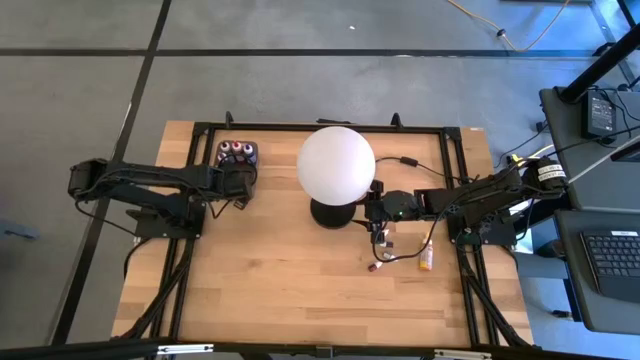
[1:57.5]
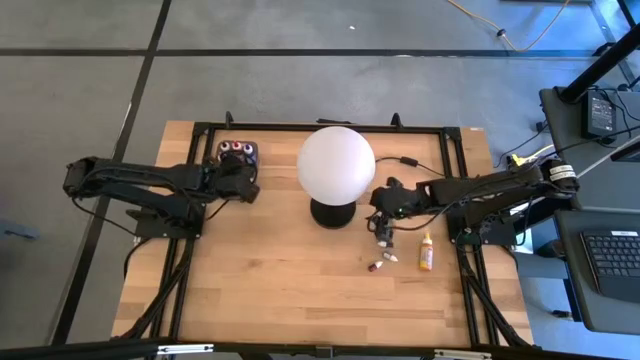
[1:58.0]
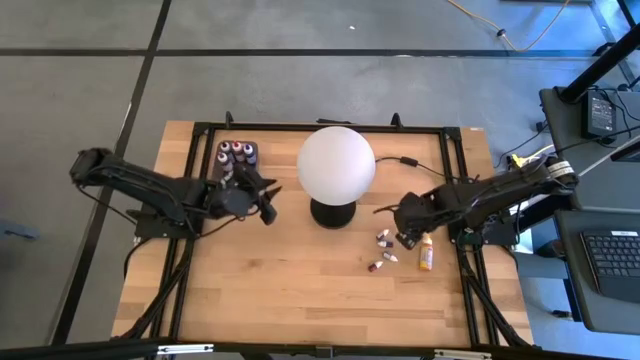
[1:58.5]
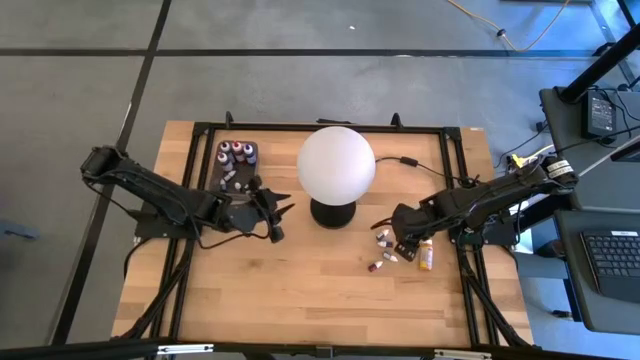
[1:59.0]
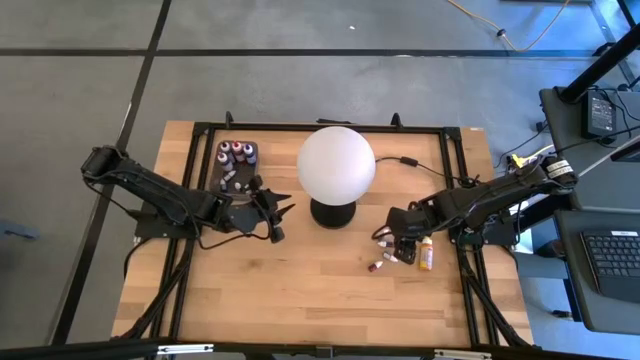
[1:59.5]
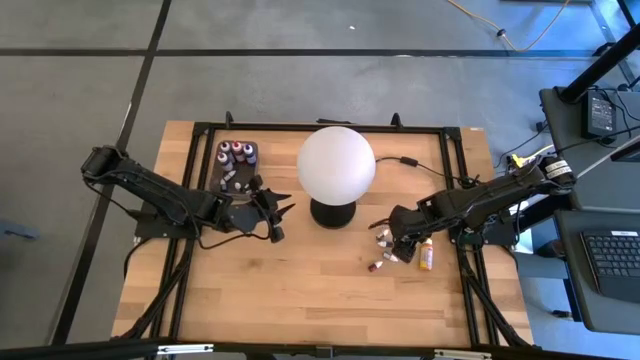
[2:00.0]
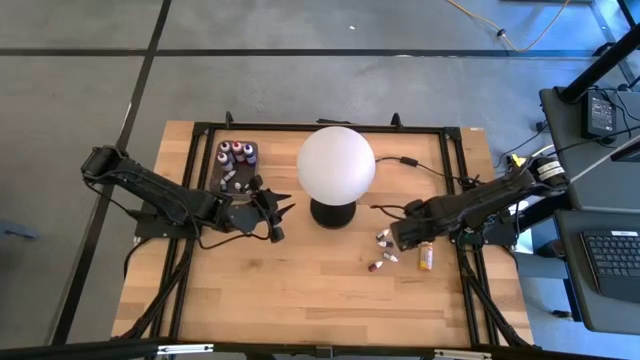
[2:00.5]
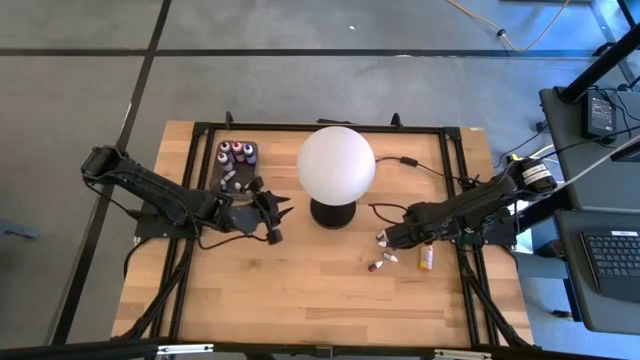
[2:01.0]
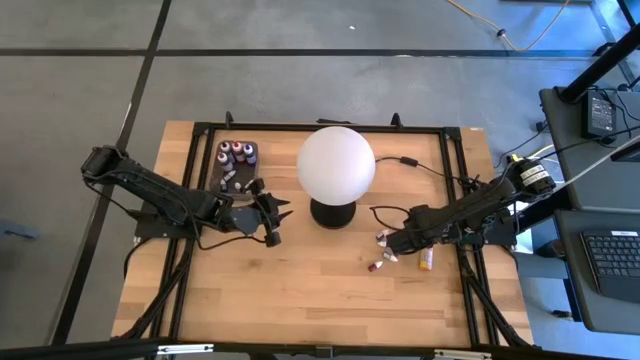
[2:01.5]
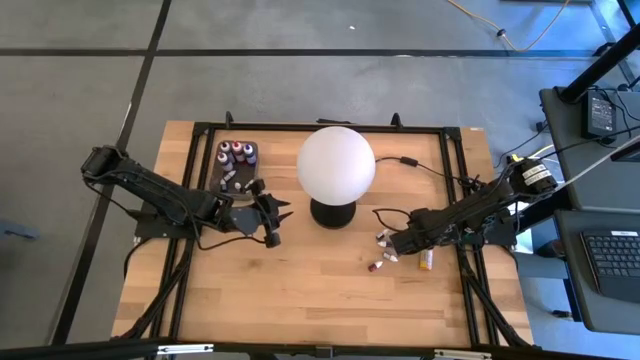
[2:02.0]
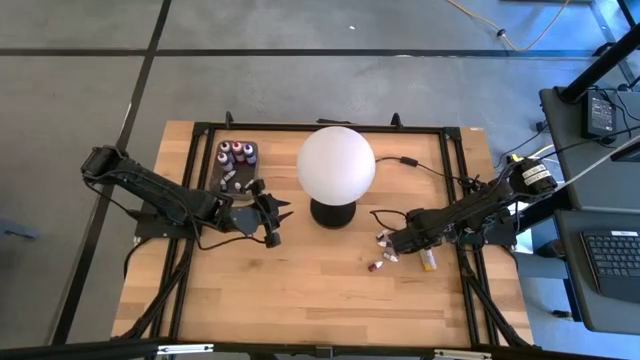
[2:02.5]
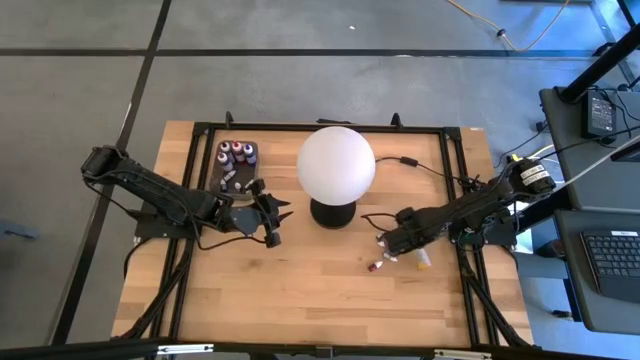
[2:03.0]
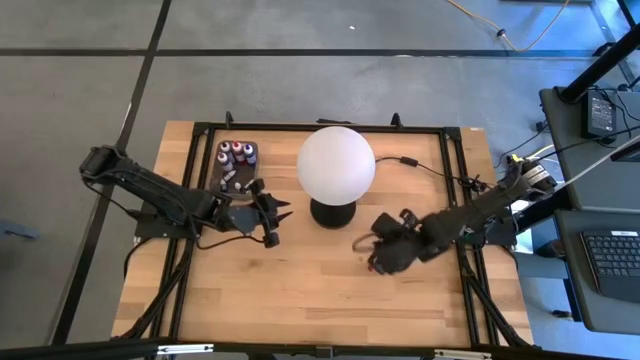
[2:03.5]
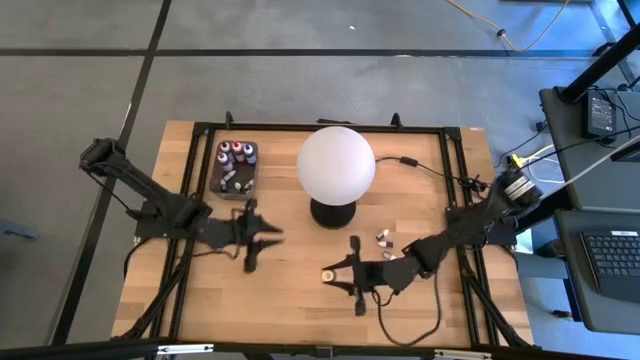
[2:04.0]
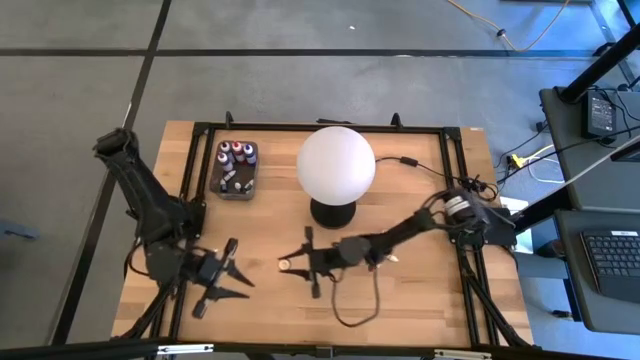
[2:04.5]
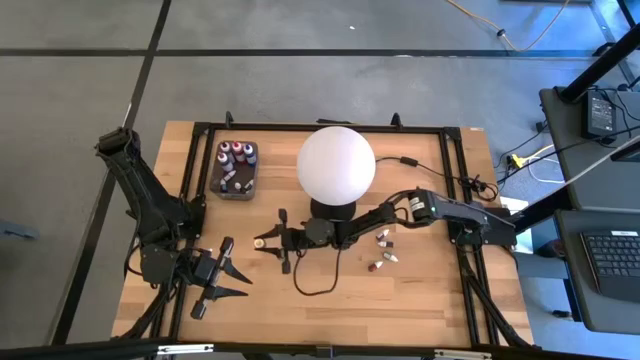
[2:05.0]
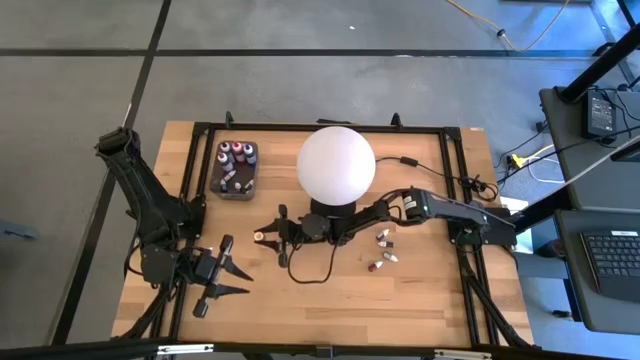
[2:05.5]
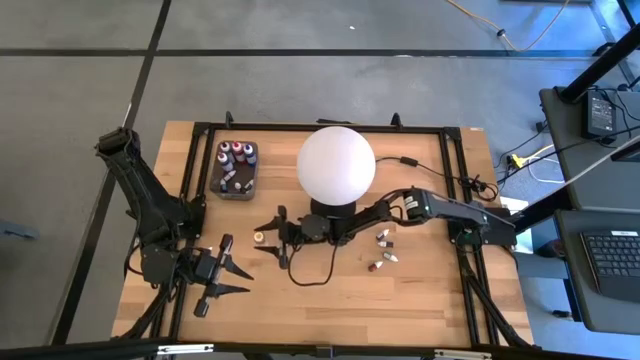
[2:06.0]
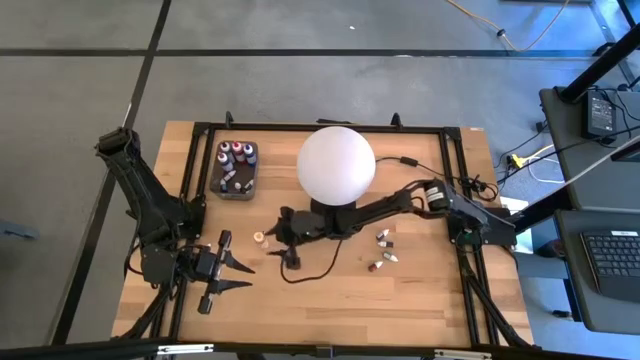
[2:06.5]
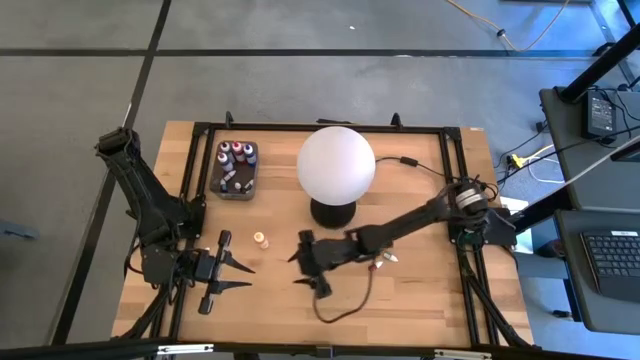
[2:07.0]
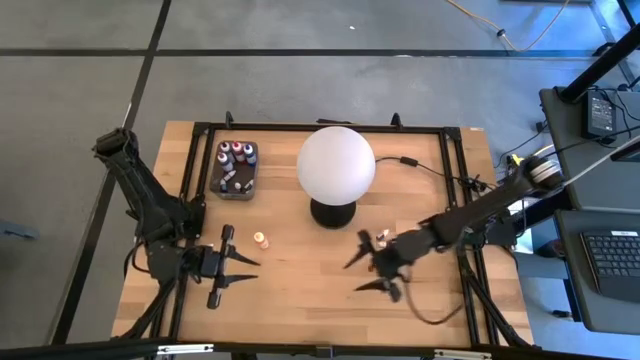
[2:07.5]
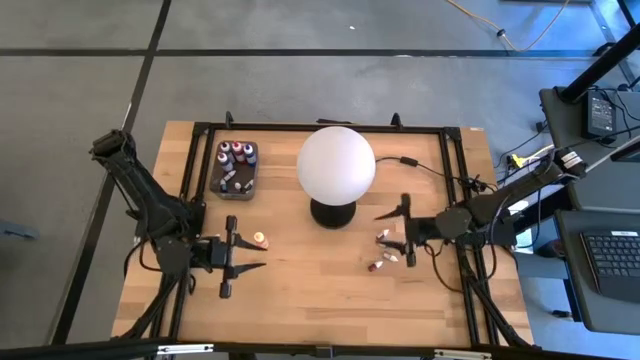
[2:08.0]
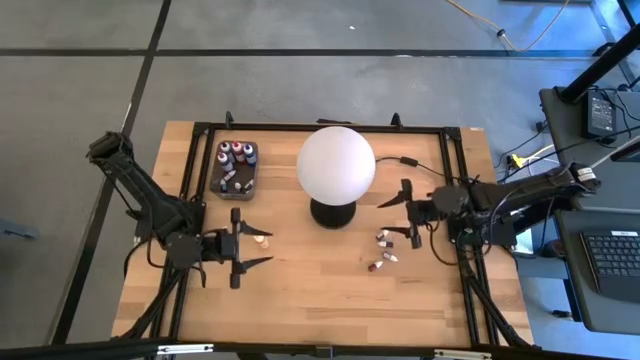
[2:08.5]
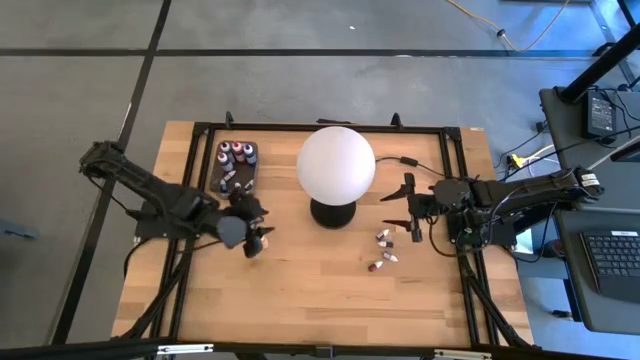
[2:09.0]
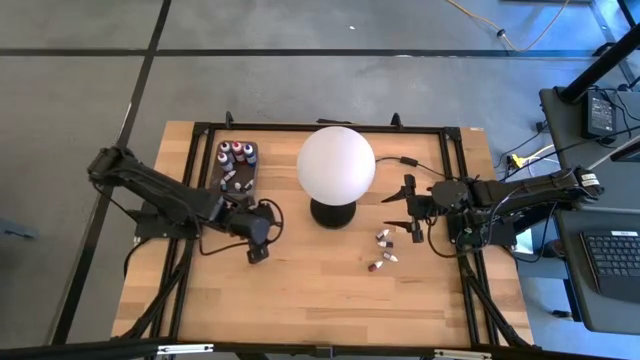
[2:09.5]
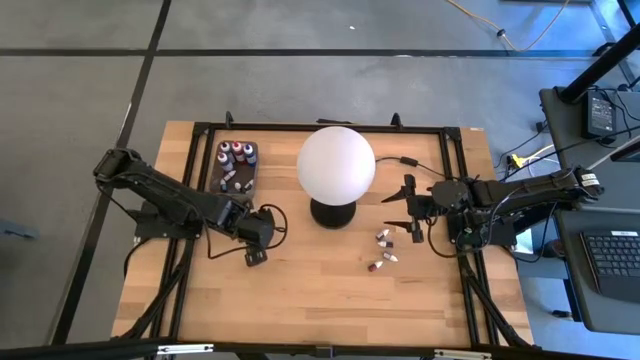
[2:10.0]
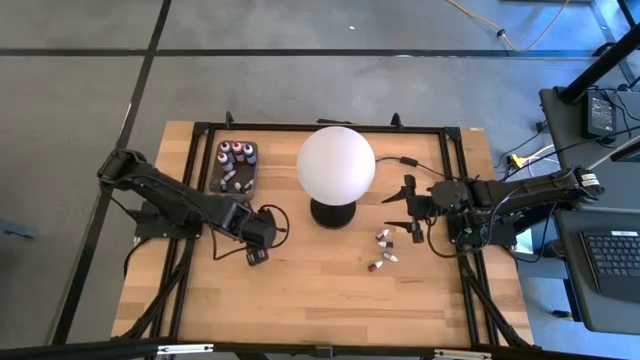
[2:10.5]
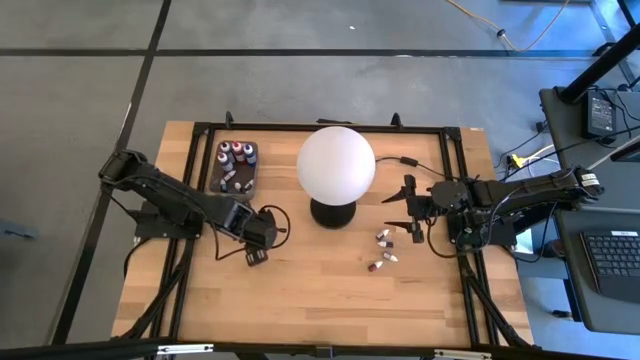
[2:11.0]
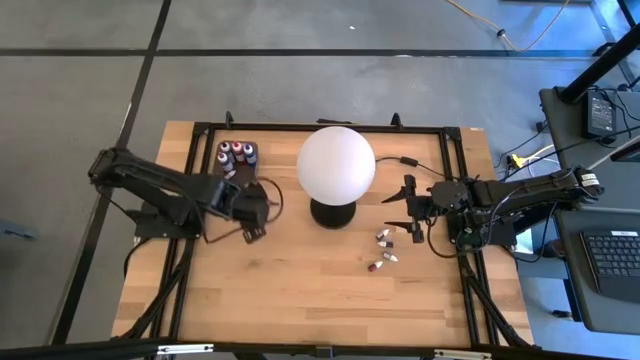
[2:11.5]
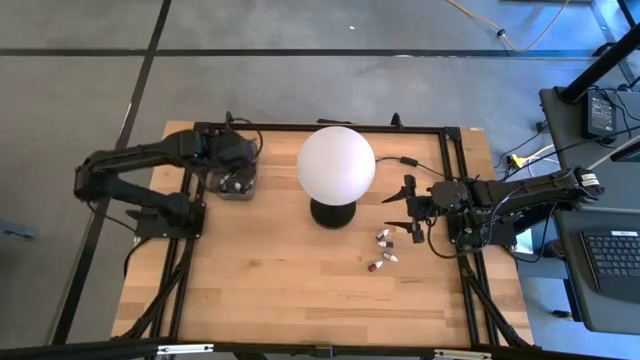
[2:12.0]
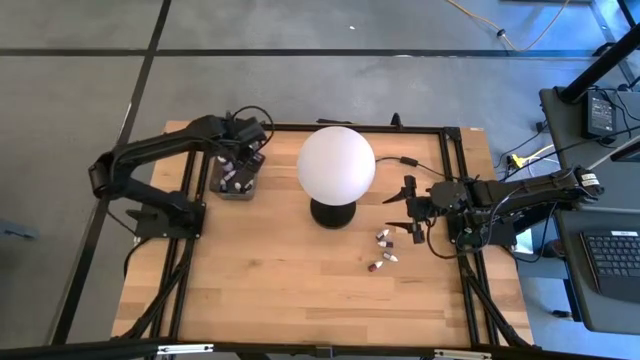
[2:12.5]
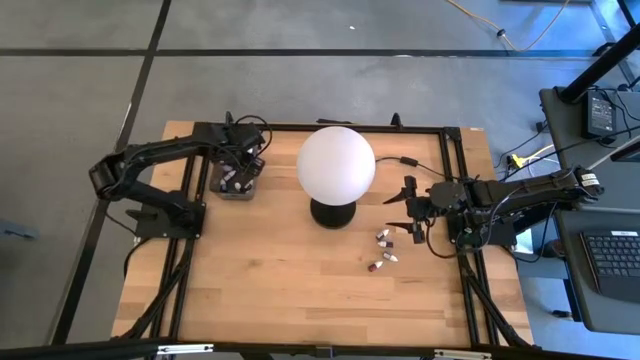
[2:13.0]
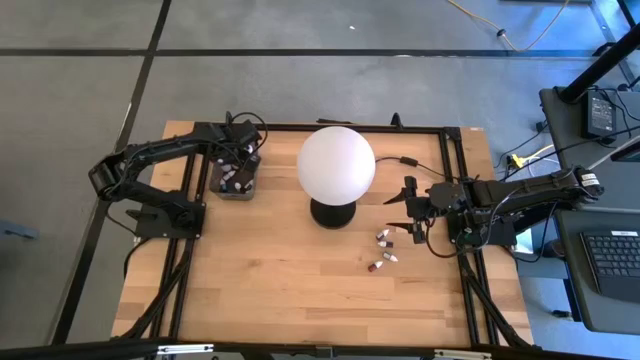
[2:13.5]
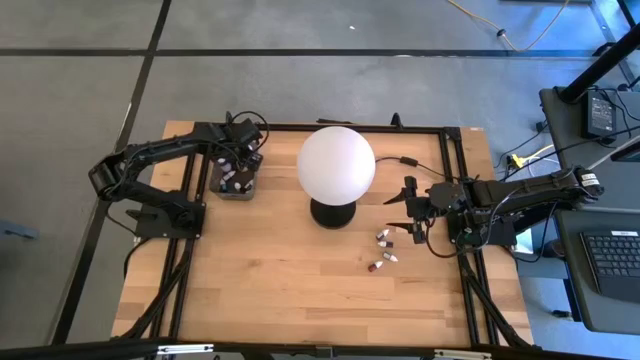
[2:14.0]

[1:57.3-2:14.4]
Task: Pick & Place food coloring
Put the big yellow food coloring bottle into the black container

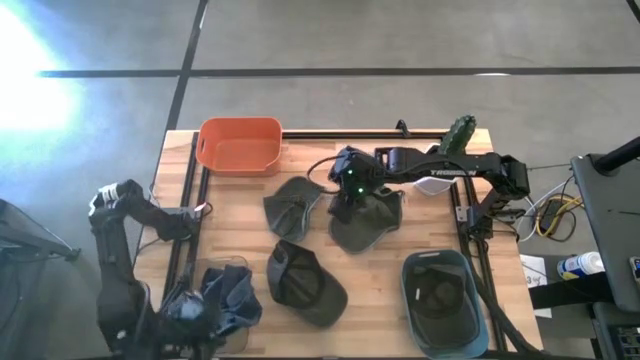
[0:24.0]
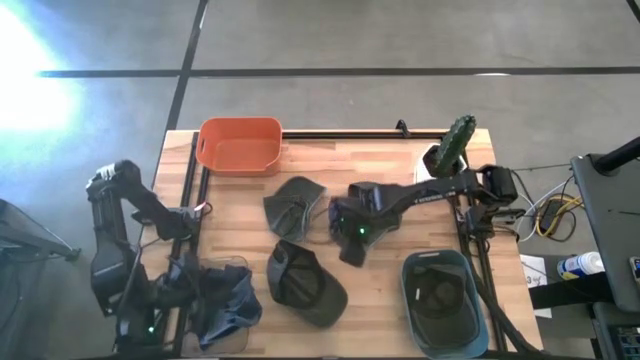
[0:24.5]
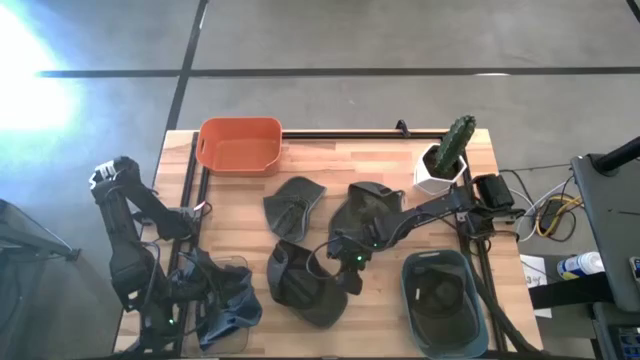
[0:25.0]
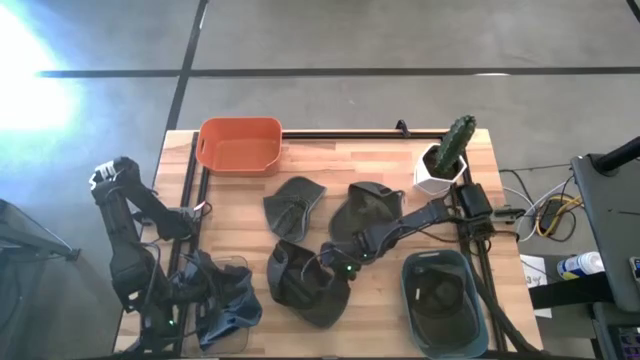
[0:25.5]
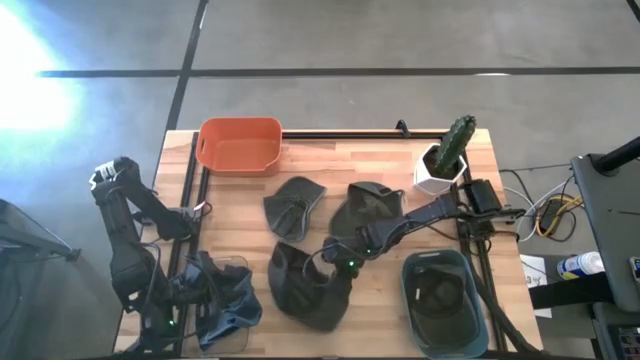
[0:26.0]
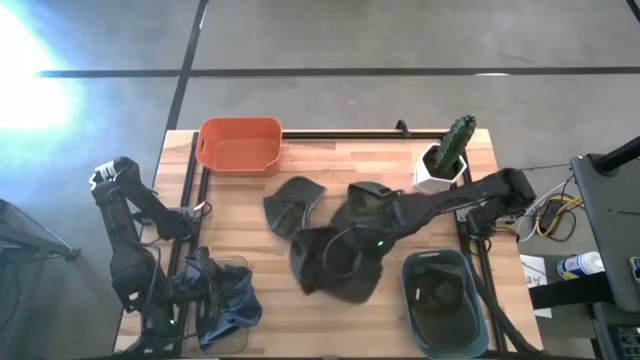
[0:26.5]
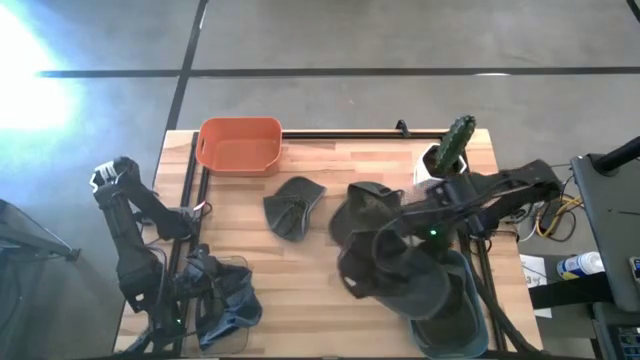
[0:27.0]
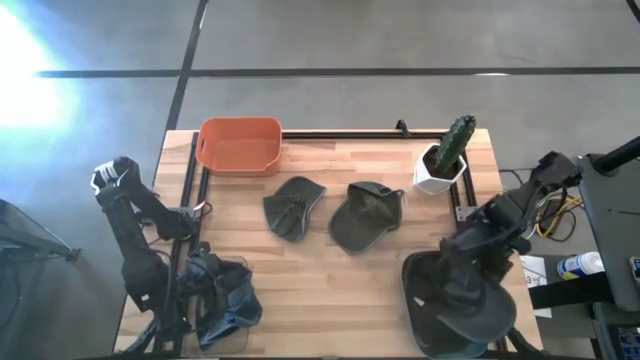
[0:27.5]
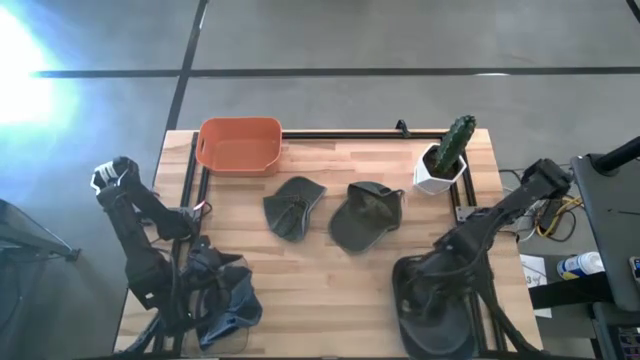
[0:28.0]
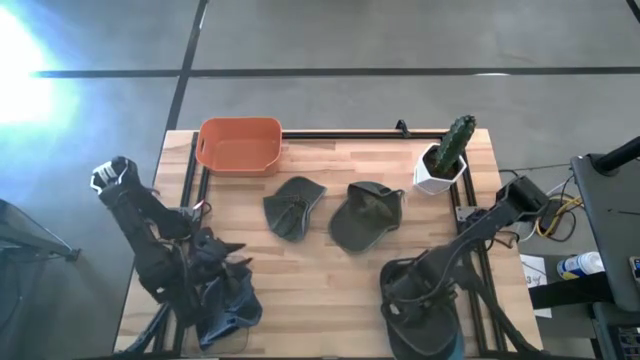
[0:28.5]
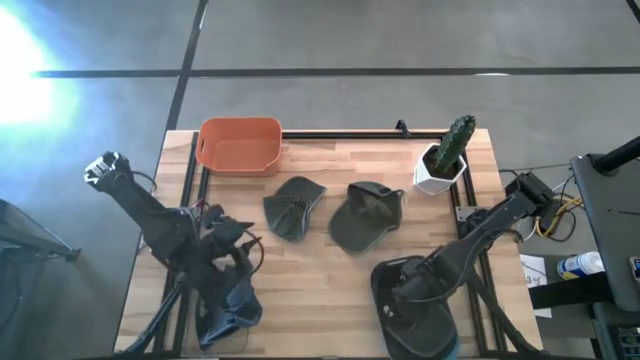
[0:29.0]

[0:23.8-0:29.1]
Task: Pick & Place hat
Put the black cap into the blue bin
